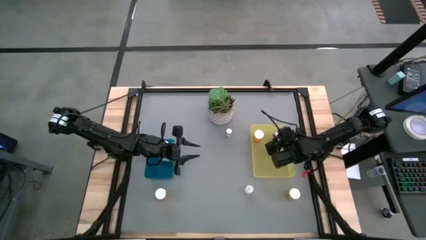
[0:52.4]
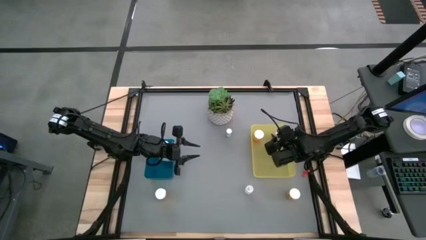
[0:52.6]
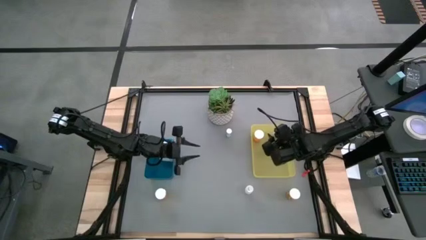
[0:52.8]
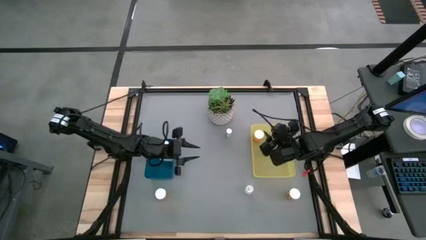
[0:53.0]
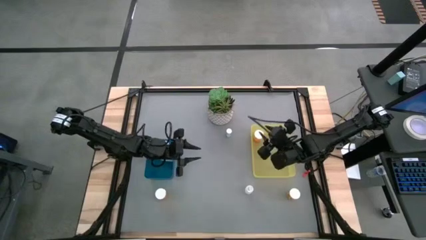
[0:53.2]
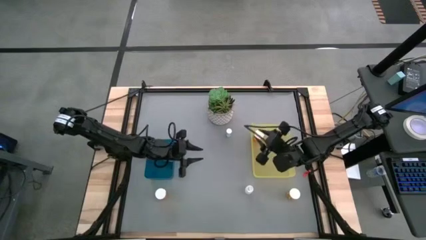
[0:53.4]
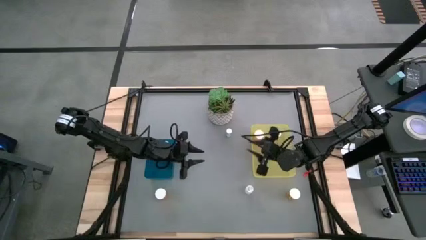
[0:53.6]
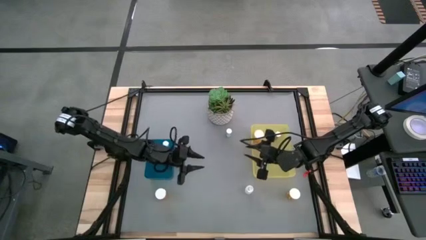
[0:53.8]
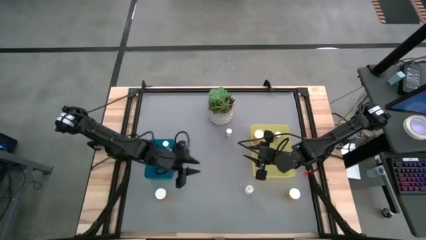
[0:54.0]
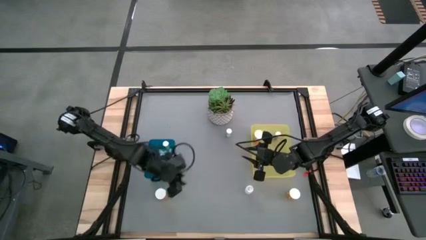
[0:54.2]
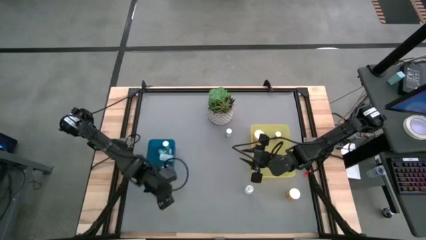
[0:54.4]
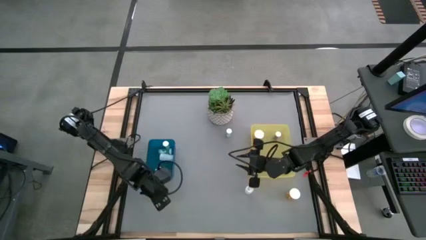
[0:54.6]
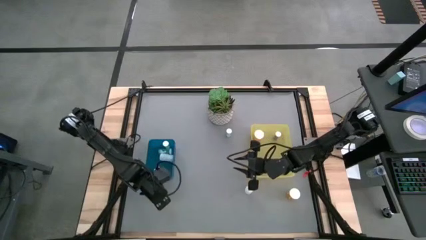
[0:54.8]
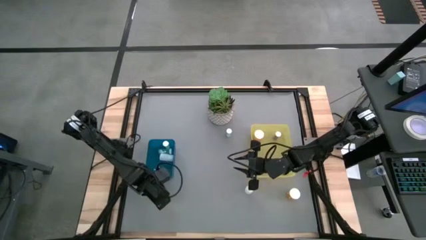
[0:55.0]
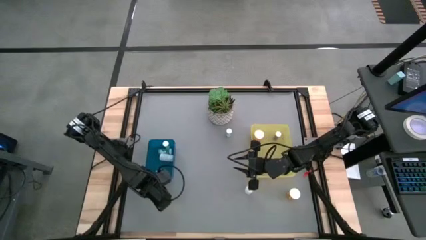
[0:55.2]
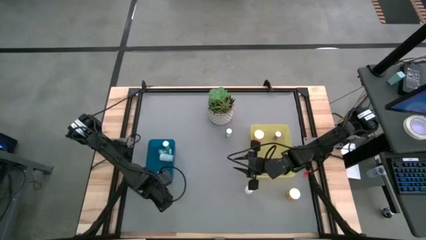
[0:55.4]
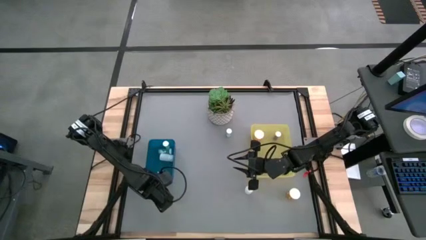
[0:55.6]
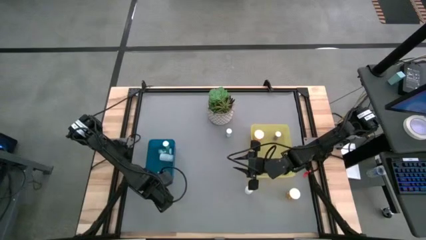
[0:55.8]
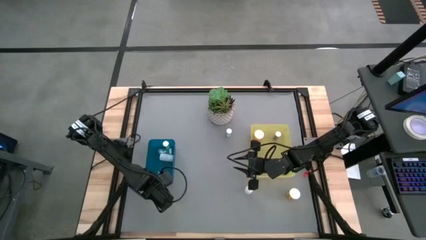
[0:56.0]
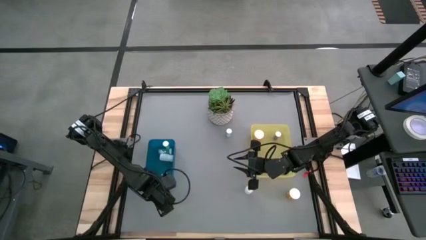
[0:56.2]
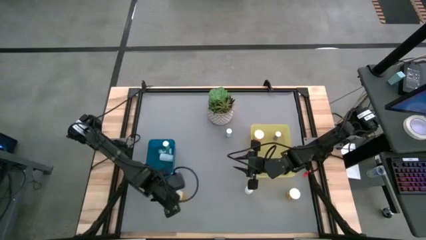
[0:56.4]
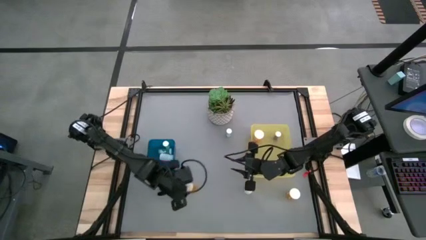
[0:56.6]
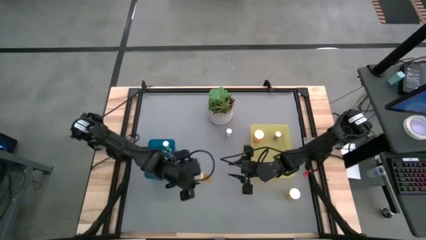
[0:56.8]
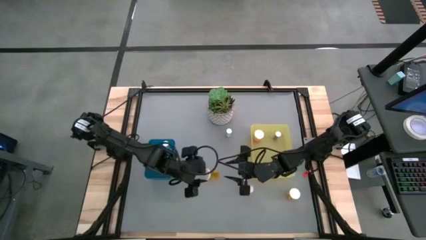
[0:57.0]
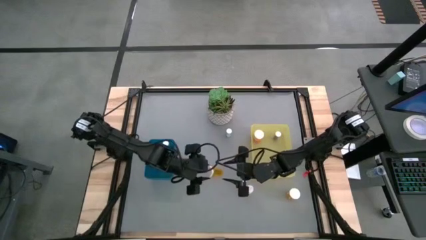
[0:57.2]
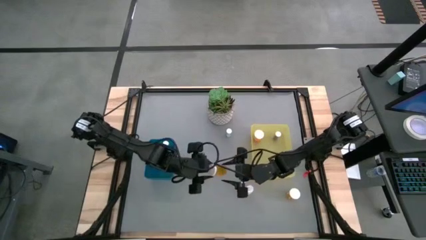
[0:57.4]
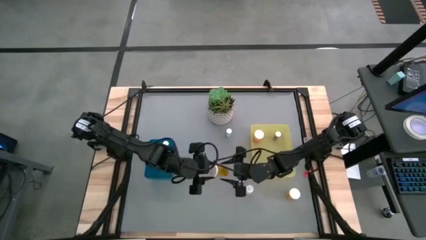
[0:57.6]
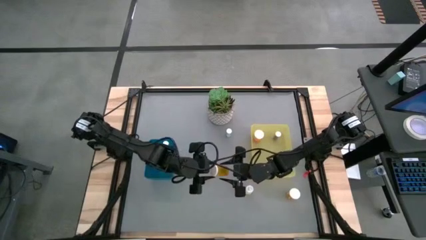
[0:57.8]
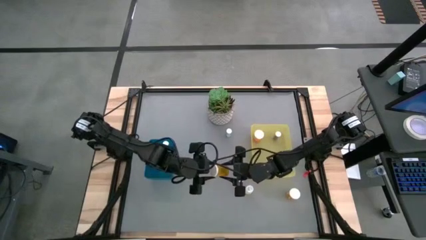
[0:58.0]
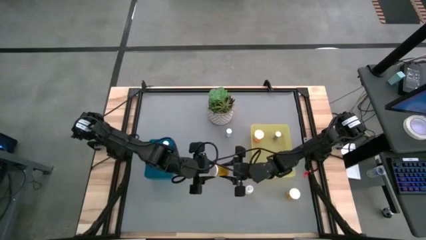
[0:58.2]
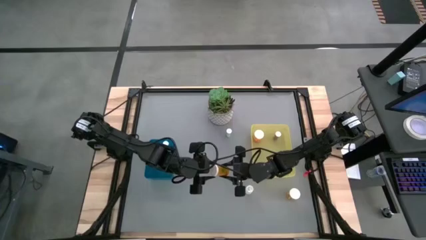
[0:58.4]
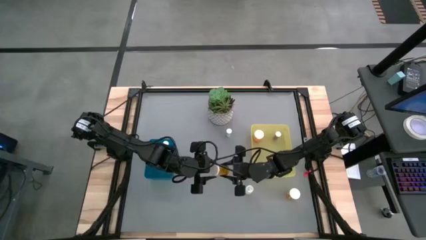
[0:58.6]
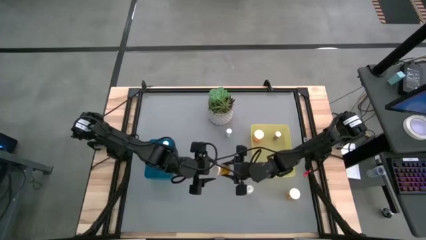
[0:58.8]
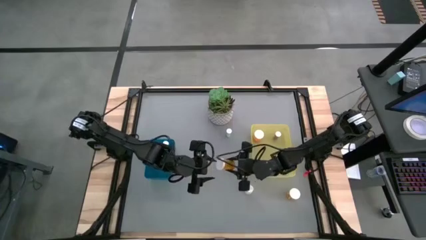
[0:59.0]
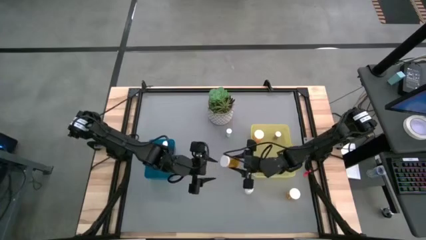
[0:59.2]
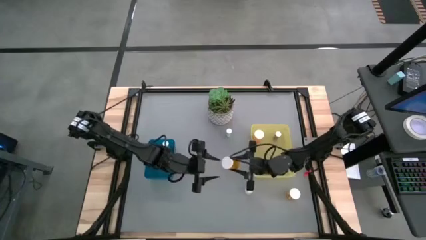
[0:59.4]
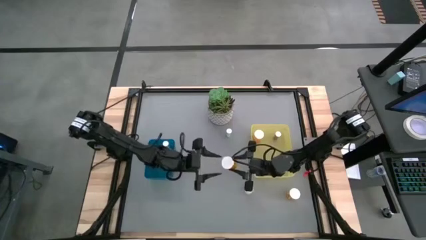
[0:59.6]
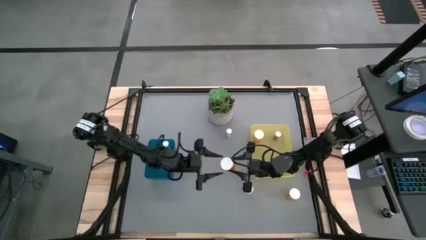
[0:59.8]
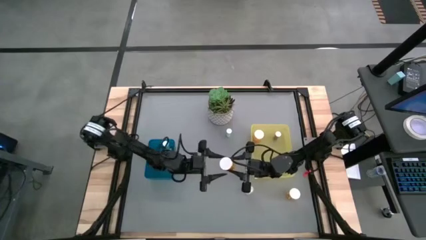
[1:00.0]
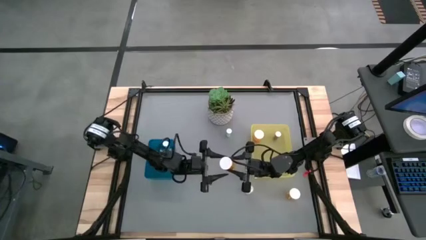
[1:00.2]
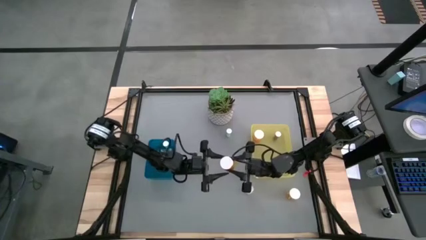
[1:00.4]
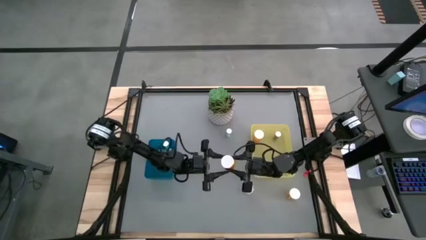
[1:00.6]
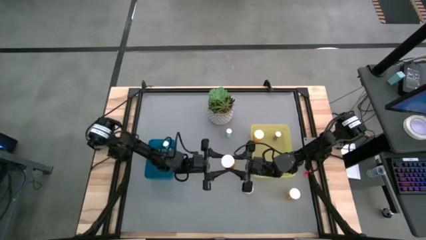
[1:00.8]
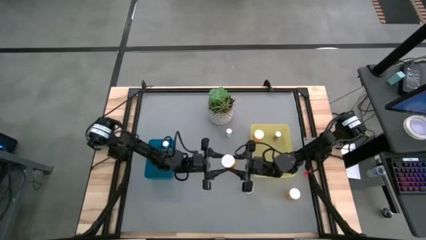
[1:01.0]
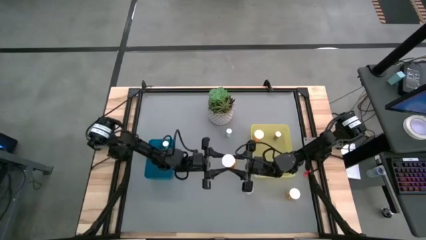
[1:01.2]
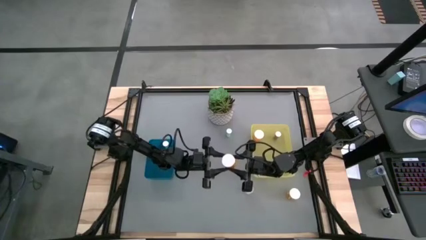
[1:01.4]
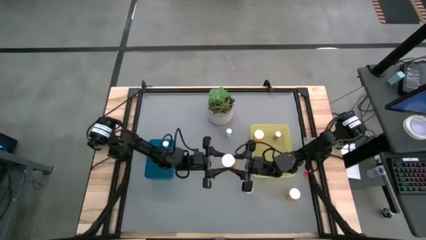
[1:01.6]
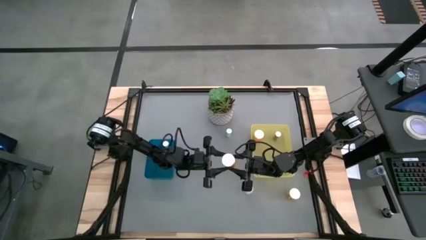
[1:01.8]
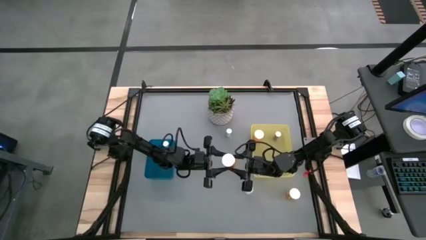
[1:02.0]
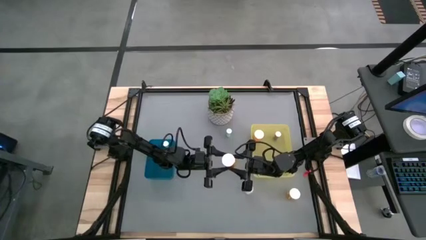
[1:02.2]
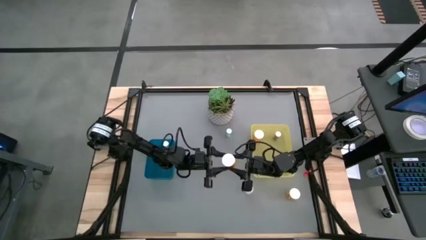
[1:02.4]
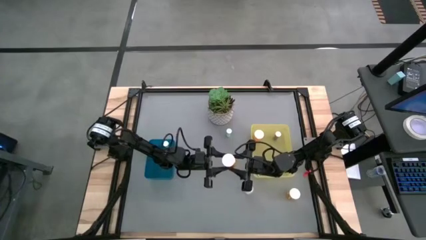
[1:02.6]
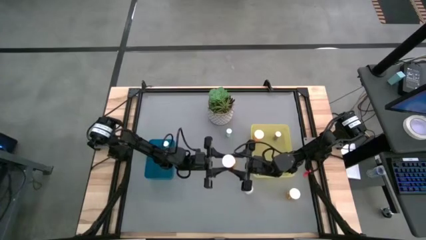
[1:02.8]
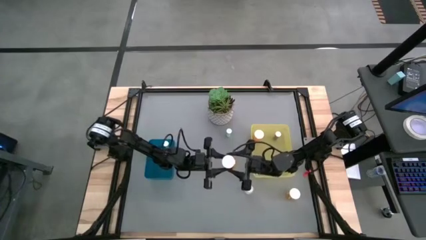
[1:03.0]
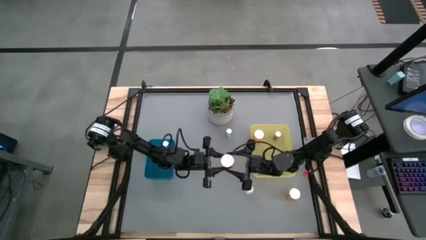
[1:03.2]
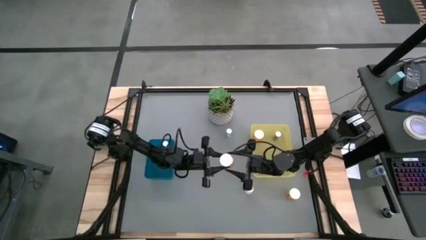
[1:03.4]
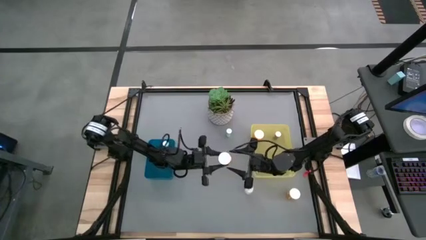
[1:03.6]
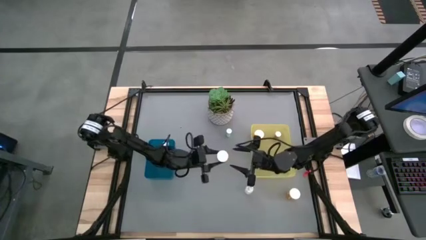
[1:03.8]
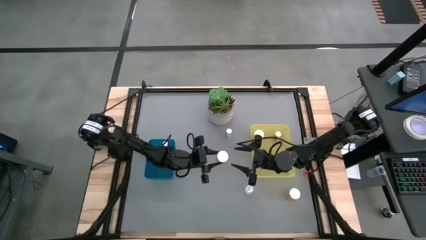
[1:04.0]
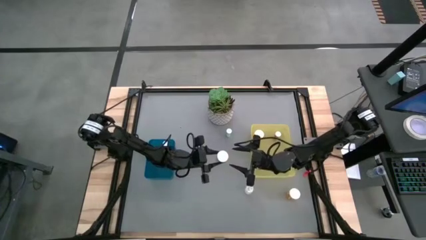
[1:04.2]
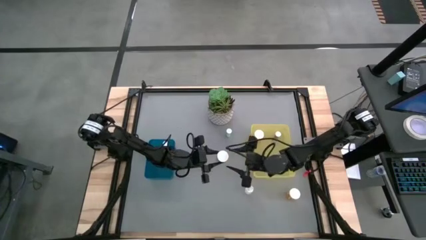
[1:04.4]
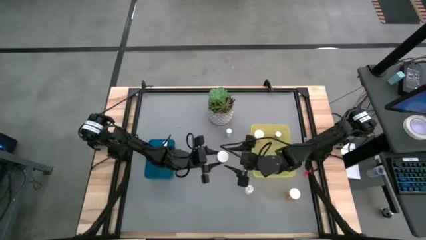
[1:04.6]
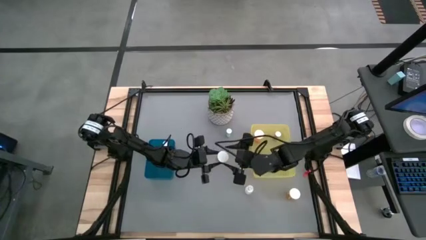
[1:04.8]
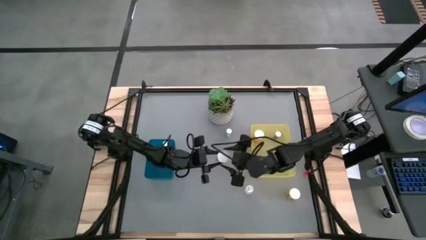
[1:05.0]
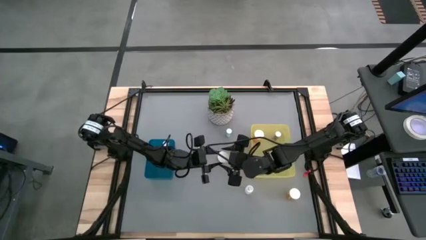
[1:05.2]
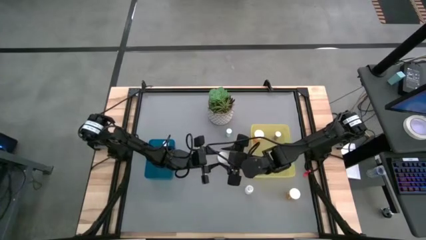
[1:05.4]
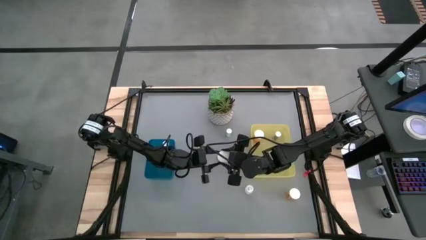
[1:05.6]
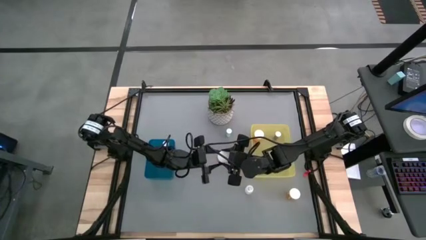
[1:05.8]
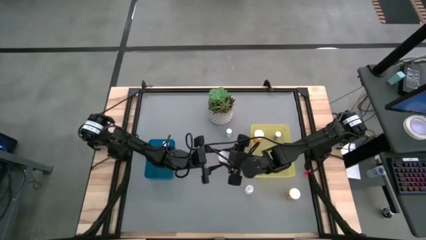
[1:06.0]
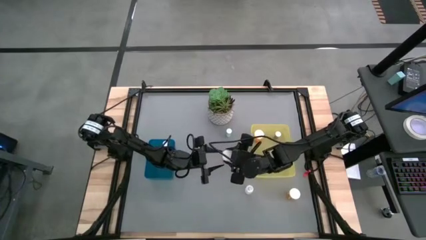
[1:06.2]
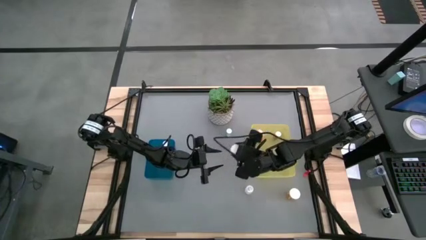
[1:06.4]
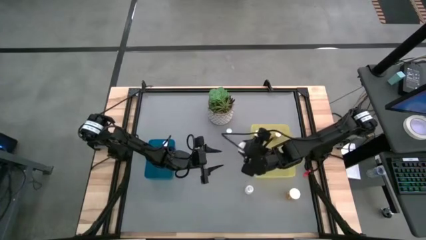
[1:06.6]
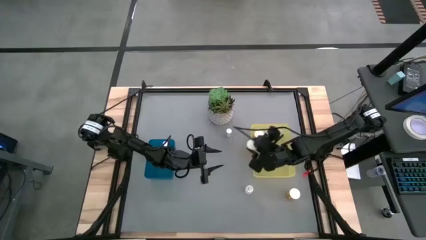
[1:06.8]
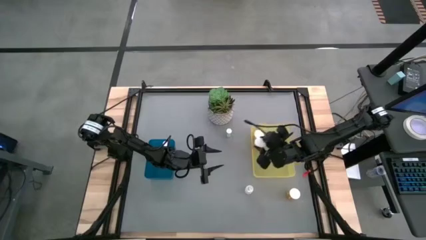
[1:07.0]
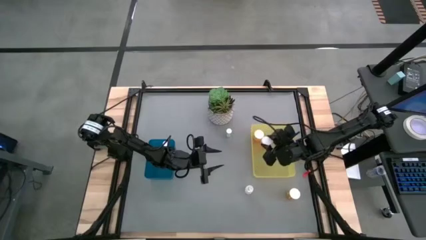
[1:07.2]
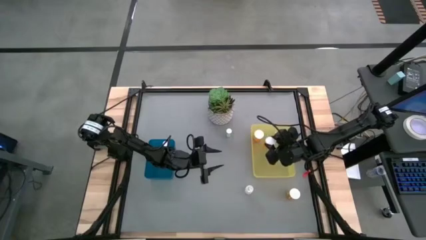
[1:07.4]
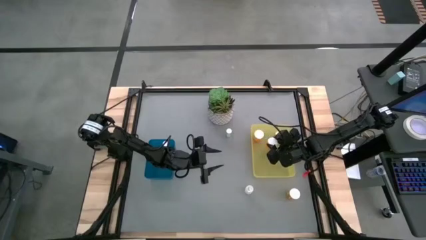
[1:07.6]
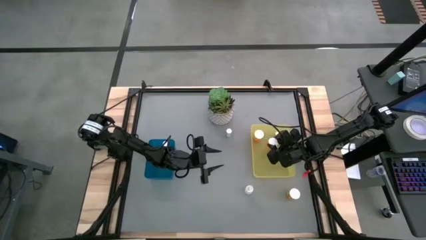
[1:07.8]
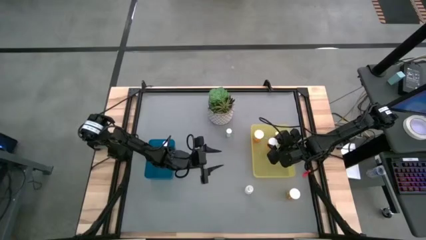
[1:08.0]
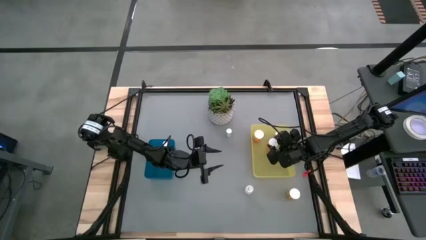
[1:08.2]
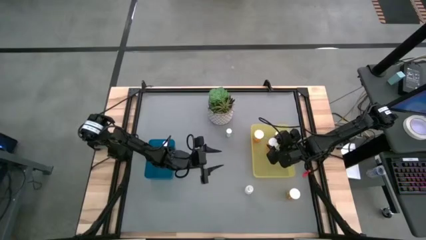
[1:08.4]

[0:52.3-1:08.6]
Task: Pick and place medicine bottles into bin by pill shape (circle, oval)
Put the left orange pill bottle into the right yellow bin
